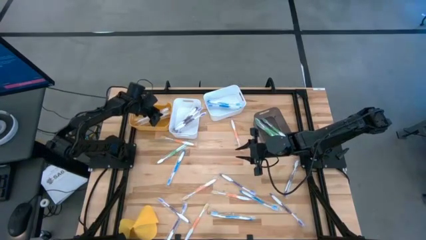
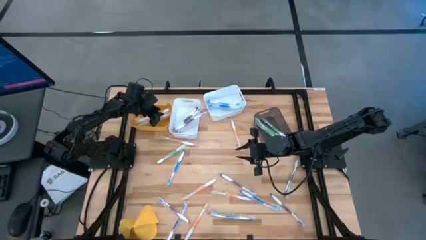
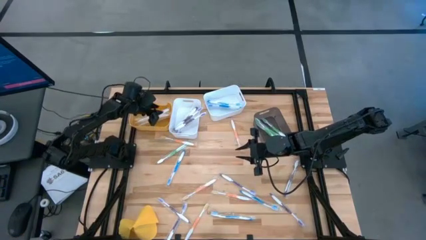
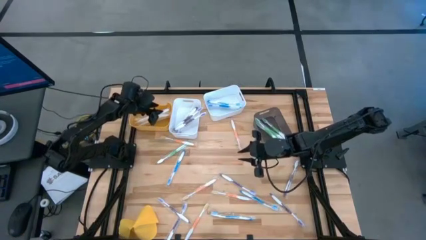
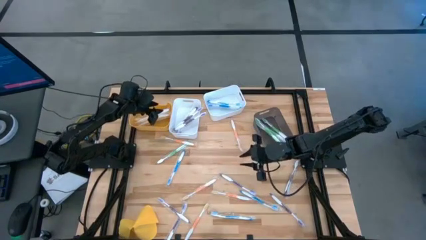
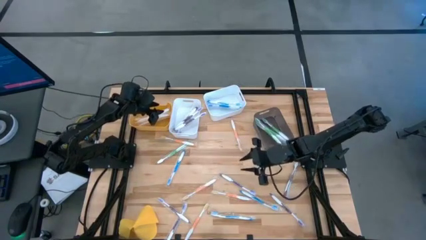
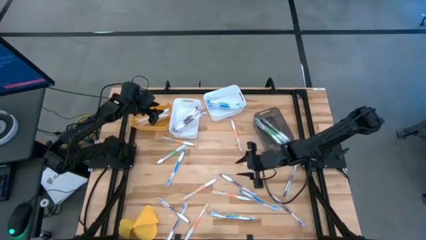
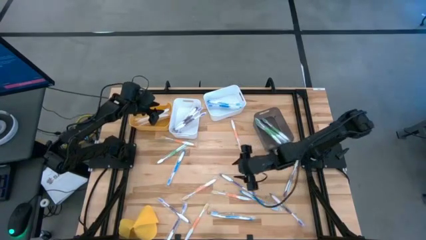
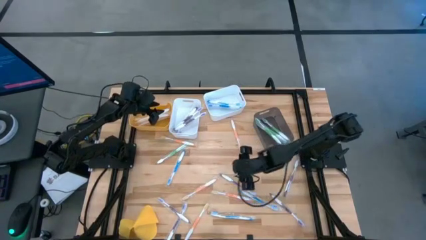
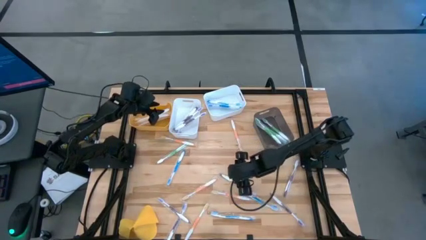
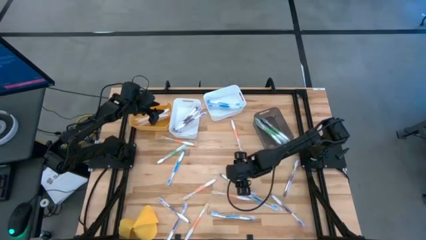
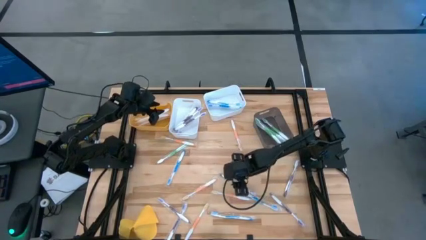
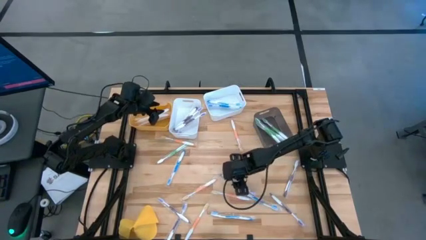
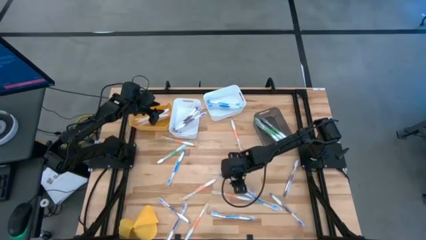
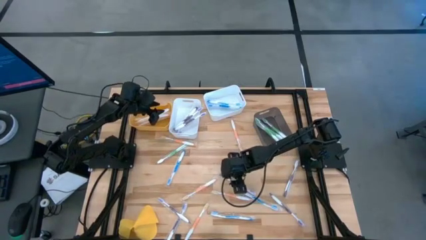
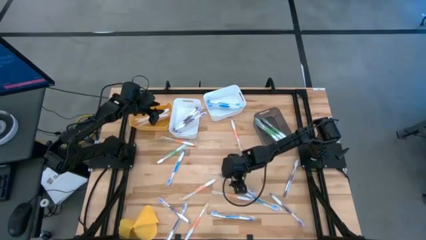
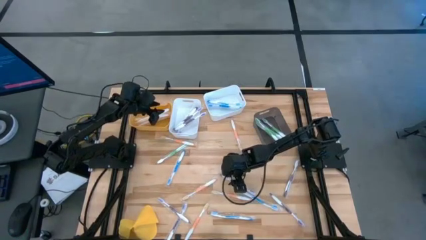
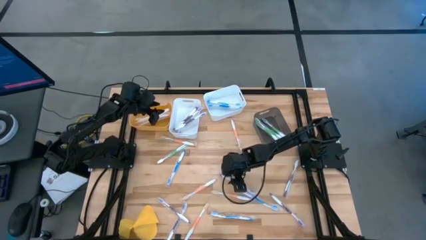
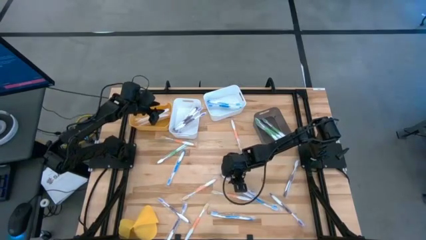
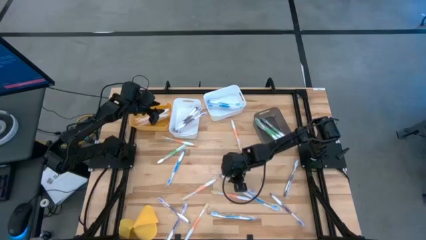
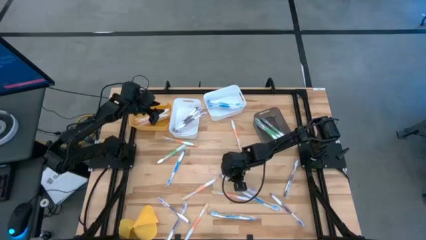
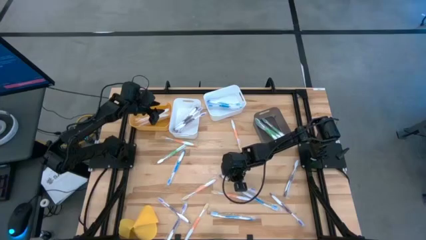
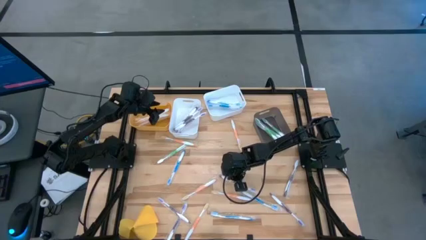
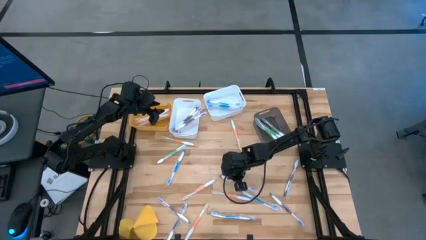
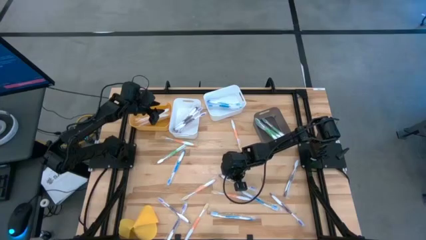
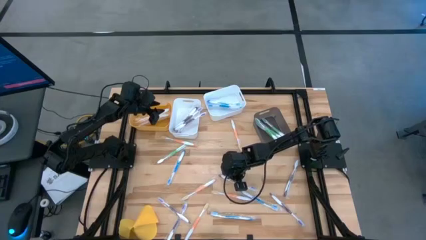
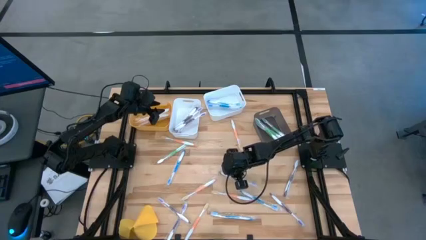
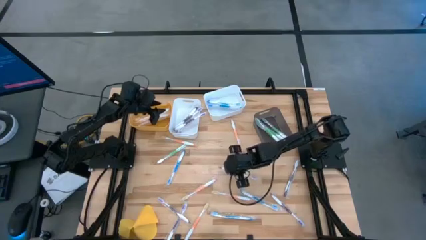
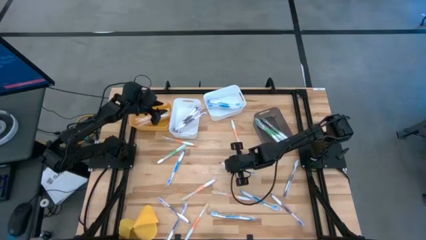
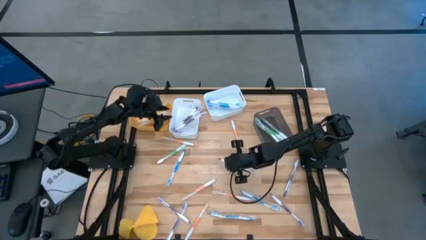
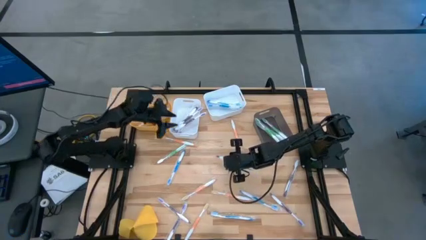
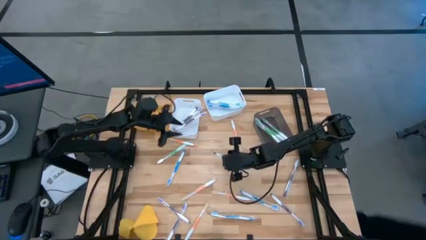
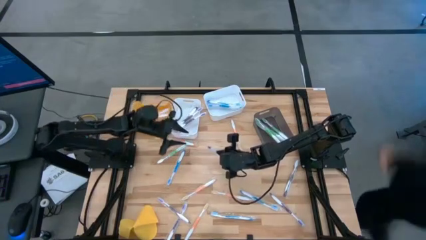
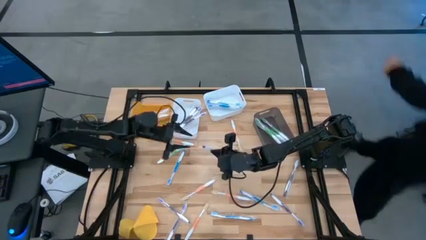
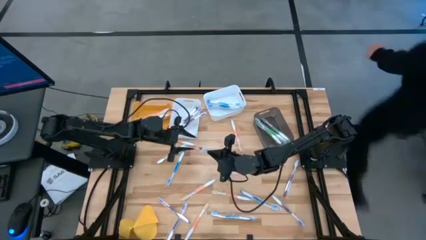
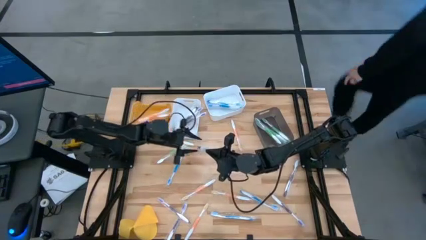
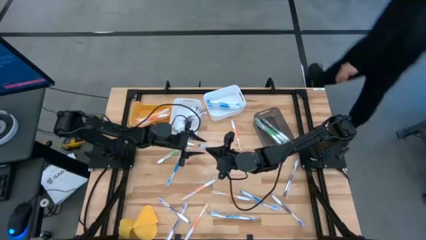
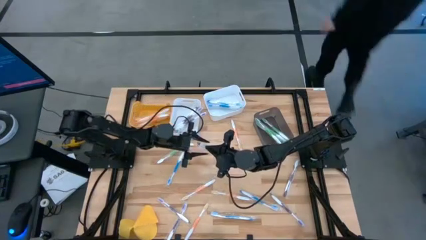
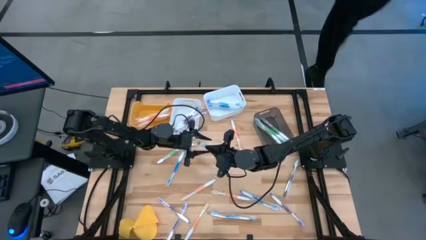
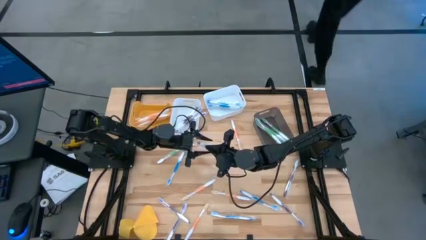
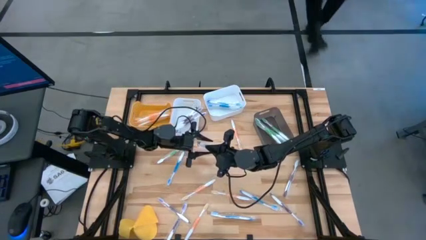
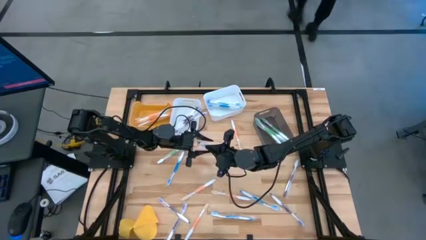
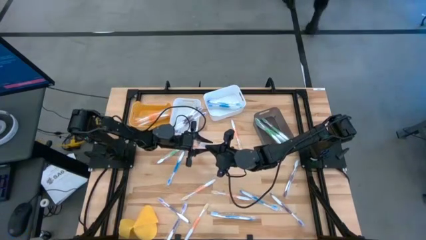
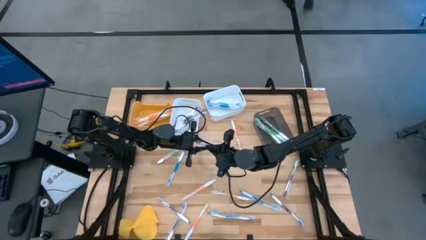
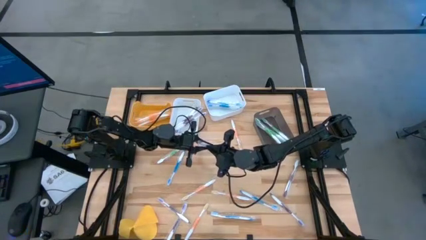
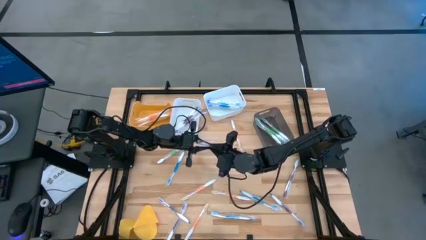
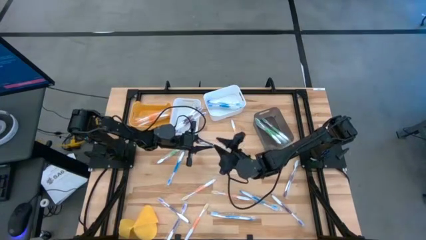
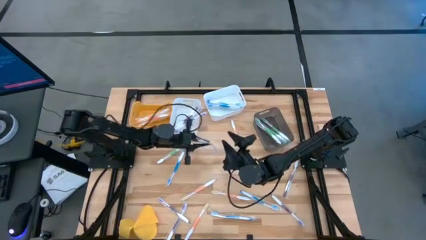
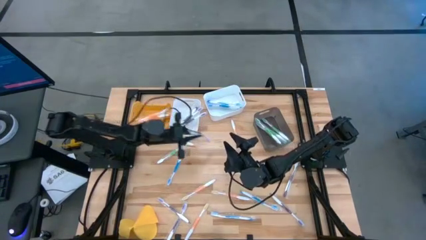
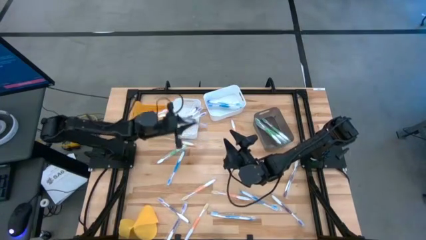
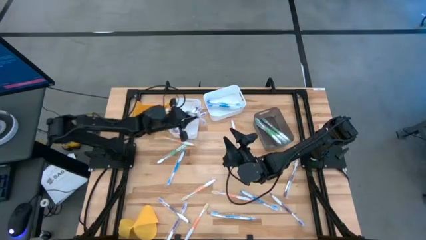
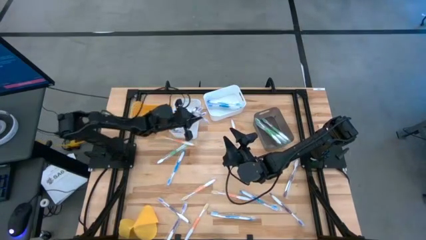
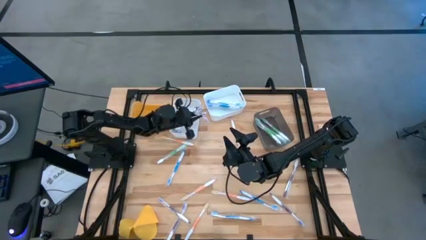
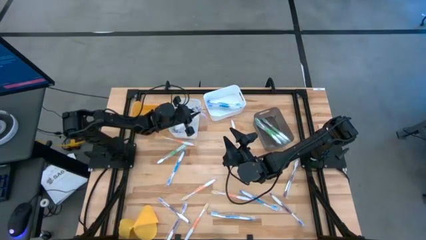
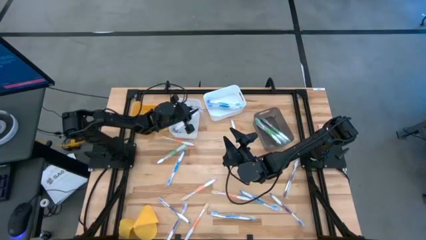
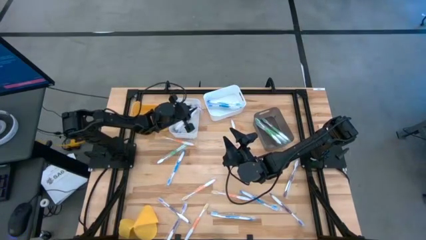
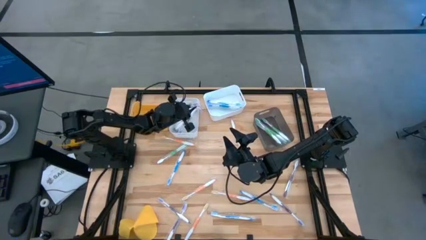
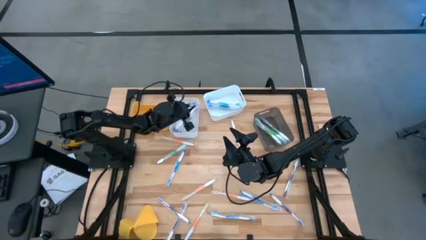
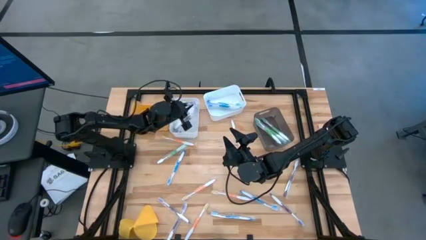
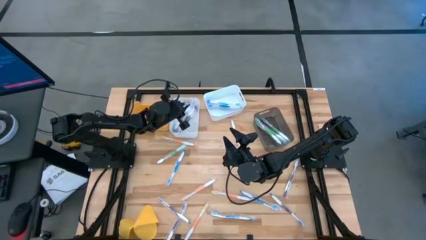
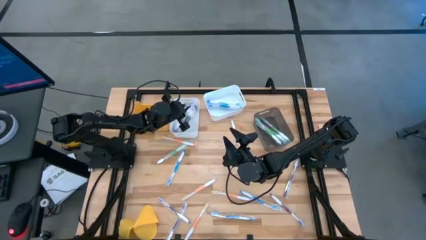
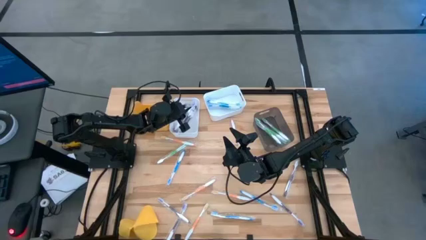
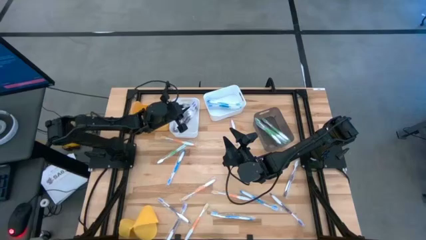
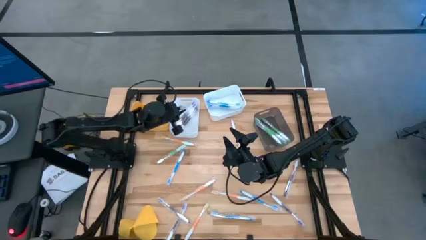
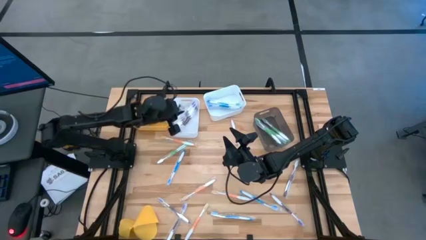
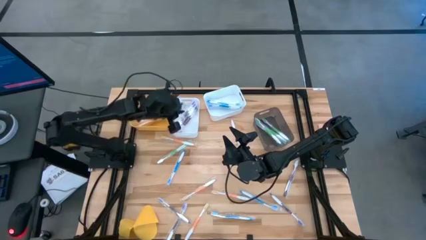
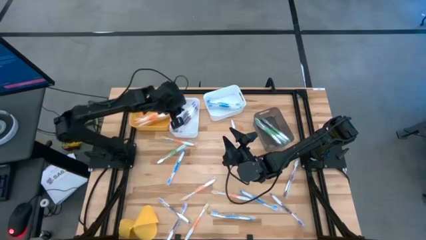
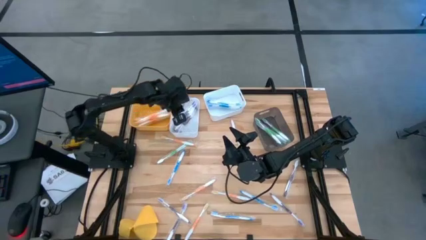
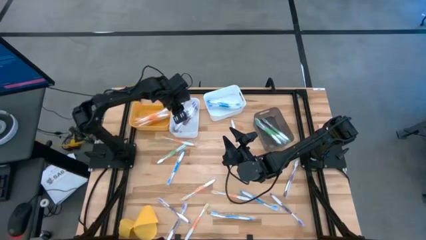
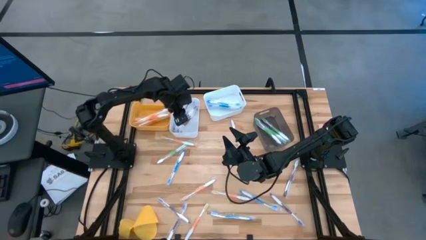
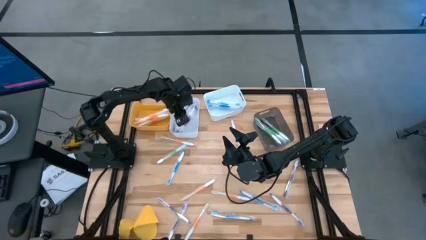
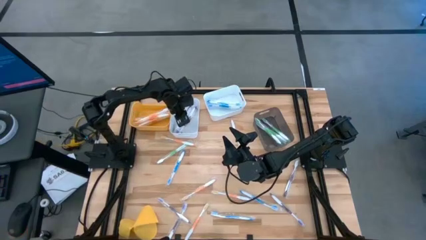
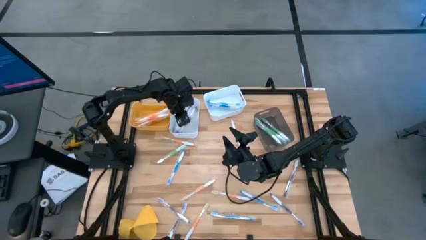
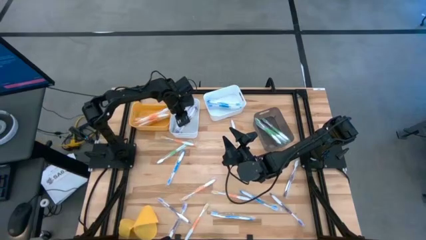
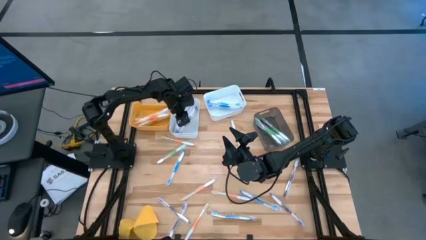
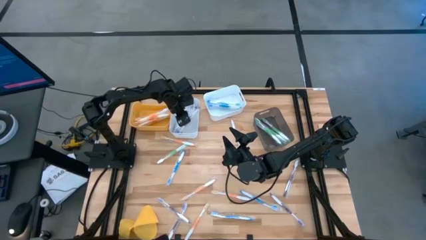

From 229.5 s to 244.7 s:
Task: Pick & Place Toothbrushes
Put the purple toothbrush into the left white bin
